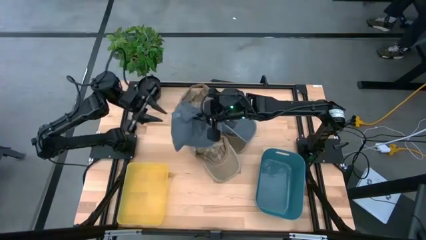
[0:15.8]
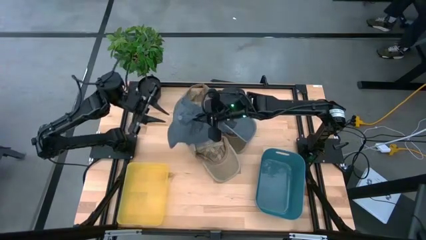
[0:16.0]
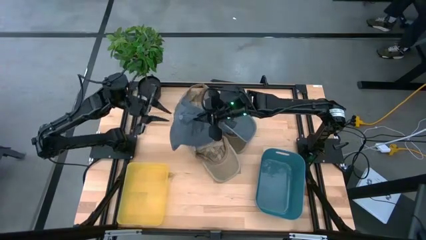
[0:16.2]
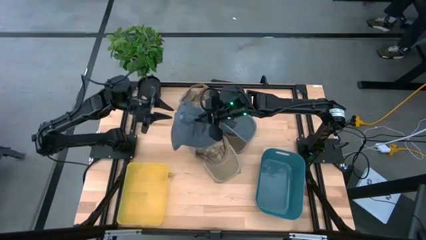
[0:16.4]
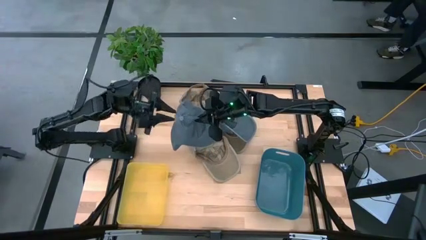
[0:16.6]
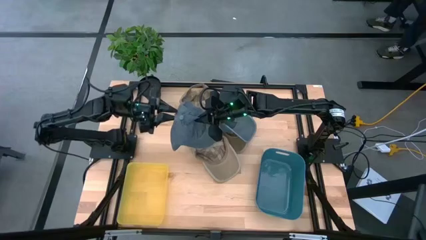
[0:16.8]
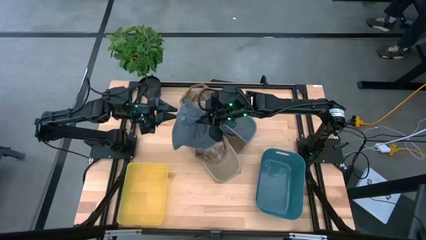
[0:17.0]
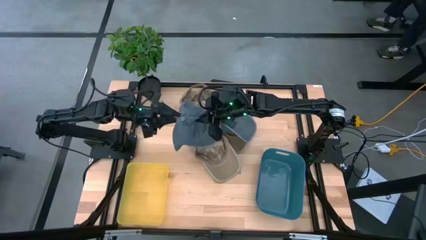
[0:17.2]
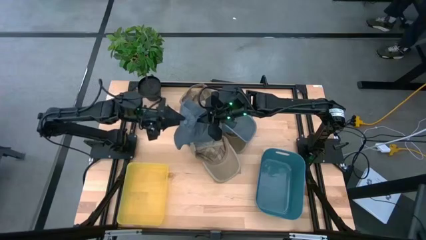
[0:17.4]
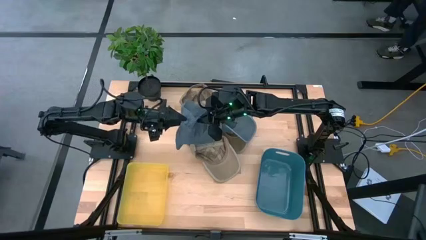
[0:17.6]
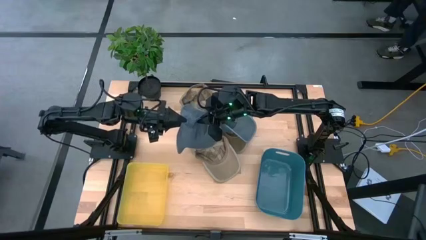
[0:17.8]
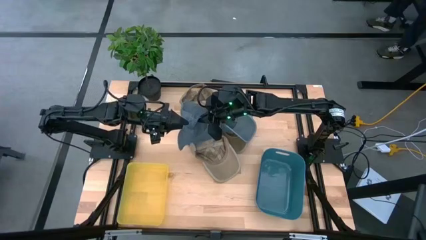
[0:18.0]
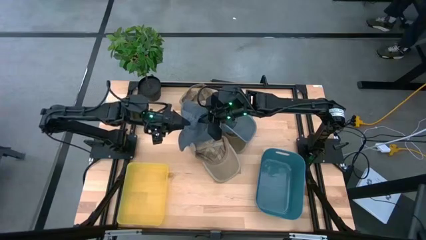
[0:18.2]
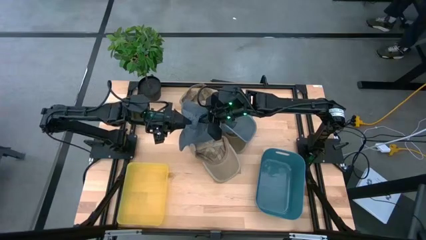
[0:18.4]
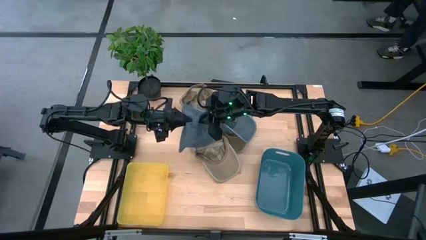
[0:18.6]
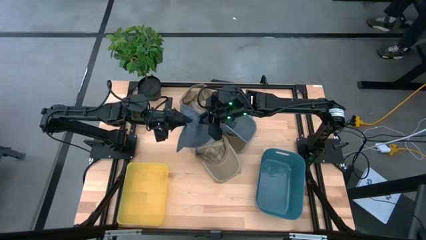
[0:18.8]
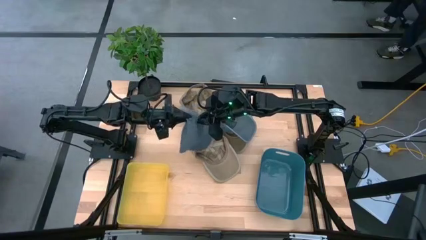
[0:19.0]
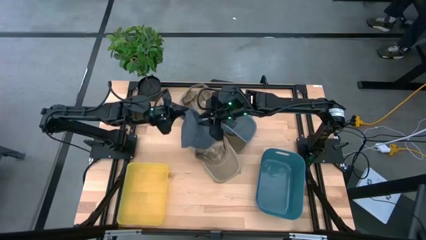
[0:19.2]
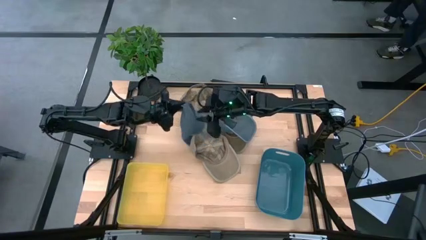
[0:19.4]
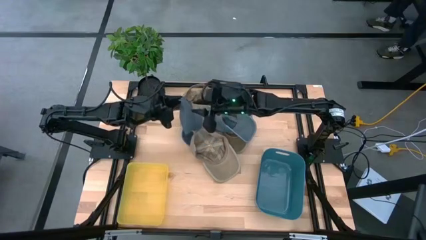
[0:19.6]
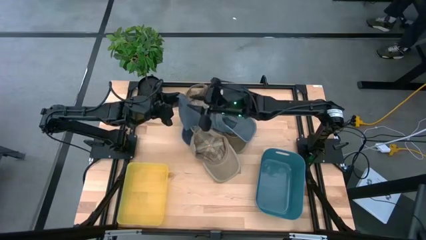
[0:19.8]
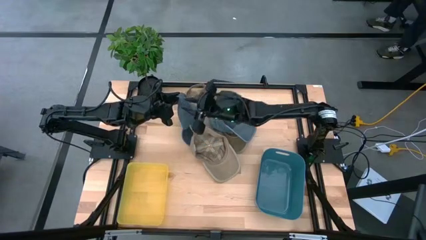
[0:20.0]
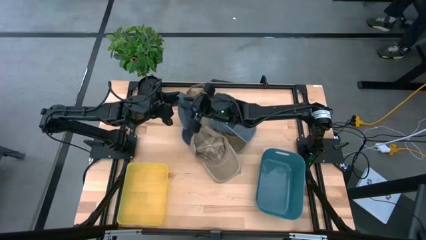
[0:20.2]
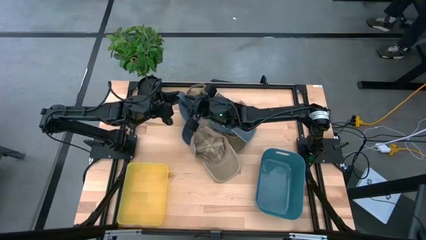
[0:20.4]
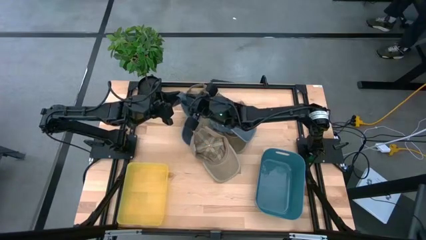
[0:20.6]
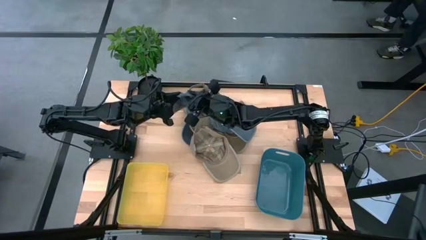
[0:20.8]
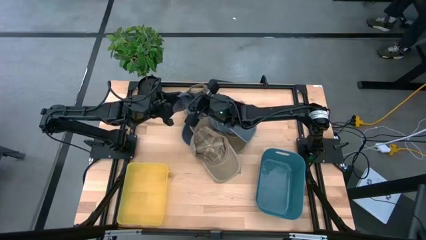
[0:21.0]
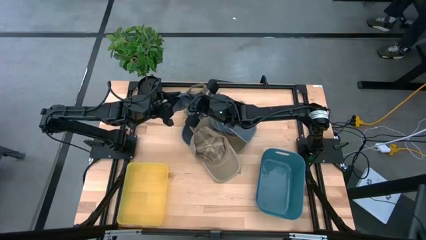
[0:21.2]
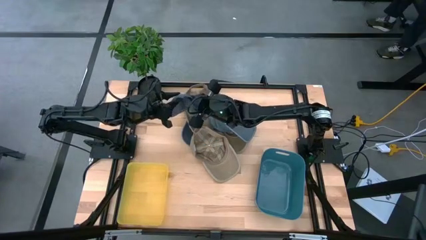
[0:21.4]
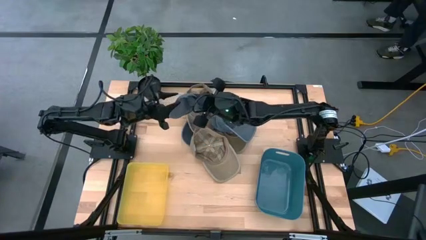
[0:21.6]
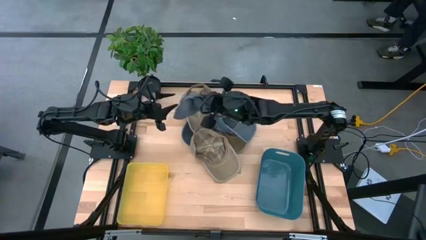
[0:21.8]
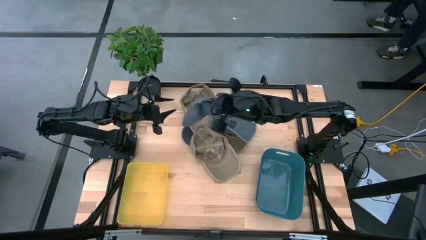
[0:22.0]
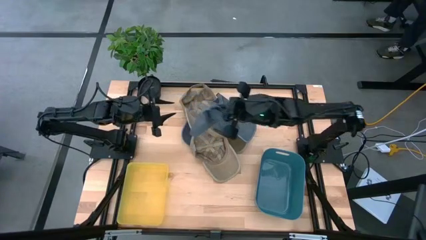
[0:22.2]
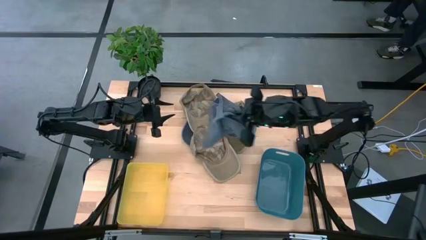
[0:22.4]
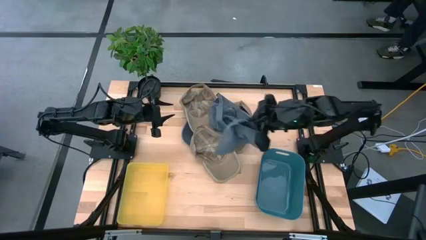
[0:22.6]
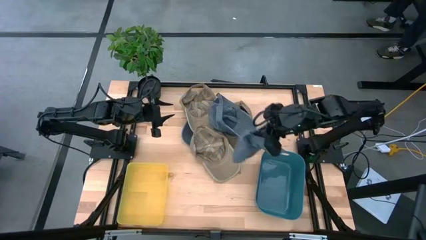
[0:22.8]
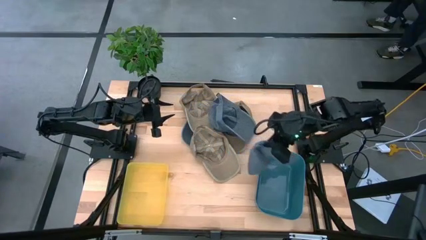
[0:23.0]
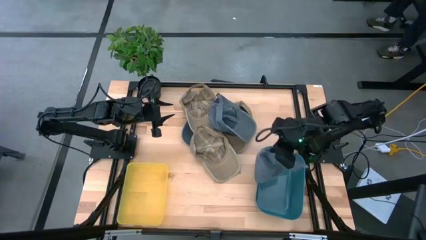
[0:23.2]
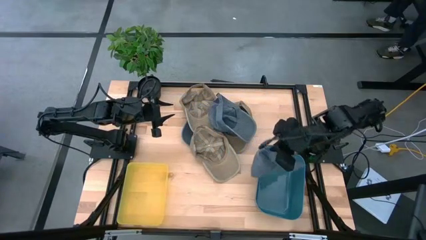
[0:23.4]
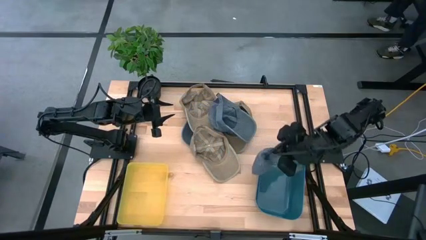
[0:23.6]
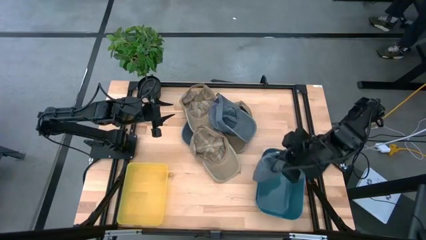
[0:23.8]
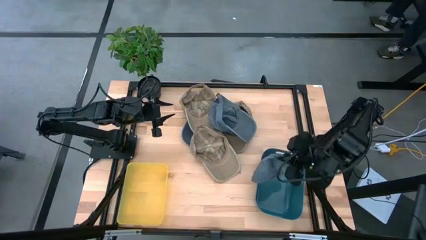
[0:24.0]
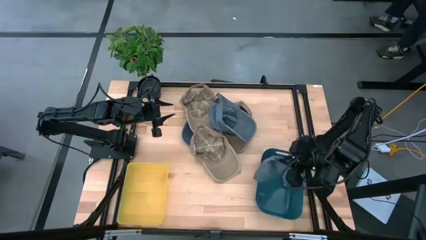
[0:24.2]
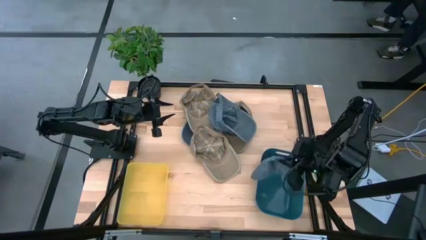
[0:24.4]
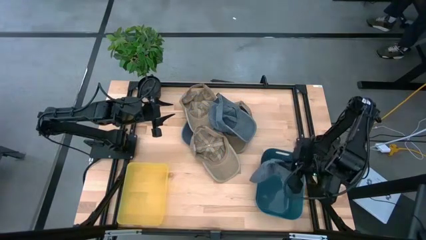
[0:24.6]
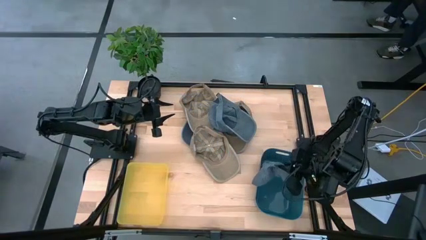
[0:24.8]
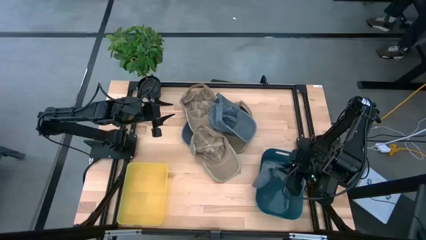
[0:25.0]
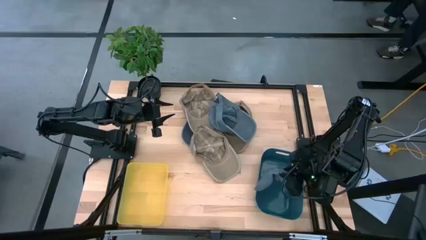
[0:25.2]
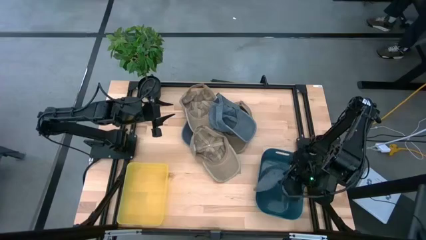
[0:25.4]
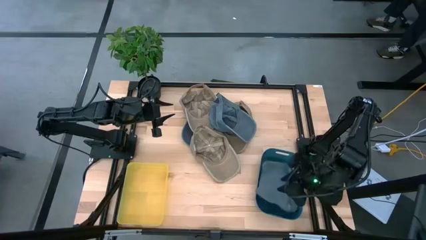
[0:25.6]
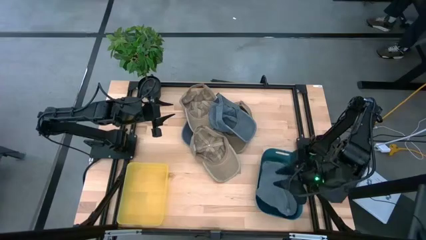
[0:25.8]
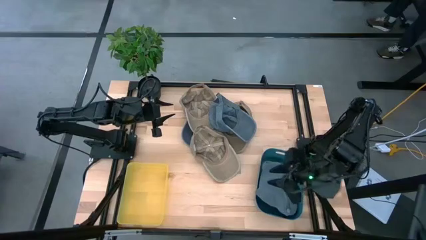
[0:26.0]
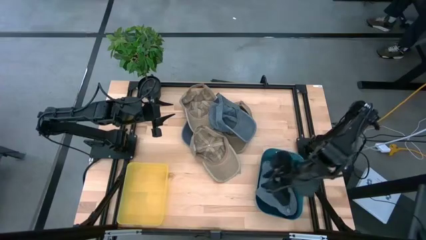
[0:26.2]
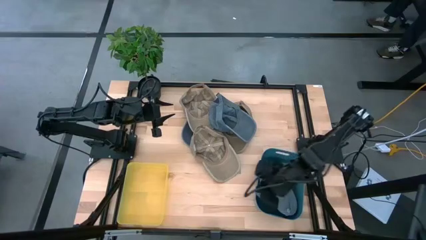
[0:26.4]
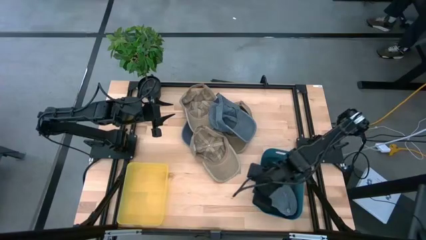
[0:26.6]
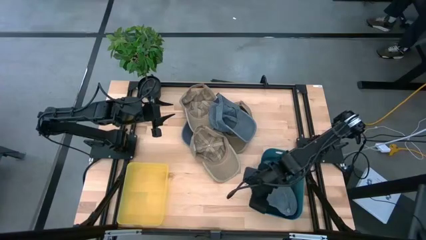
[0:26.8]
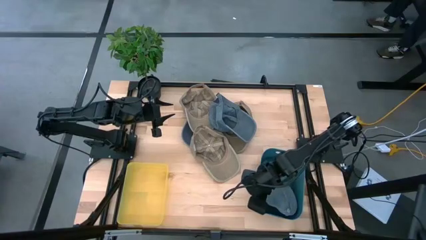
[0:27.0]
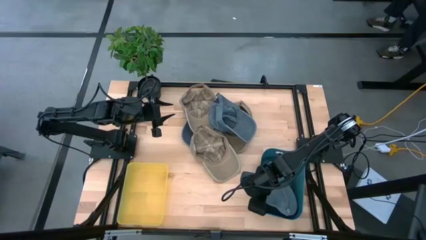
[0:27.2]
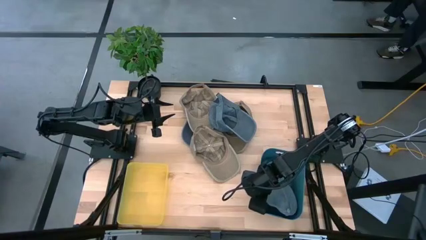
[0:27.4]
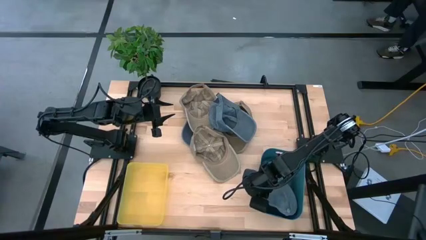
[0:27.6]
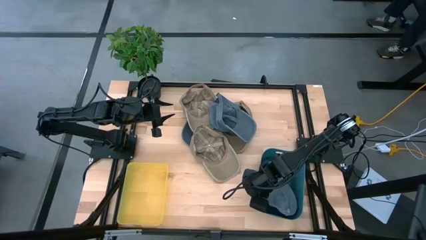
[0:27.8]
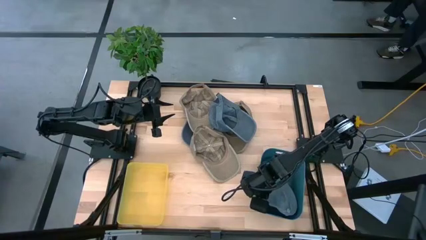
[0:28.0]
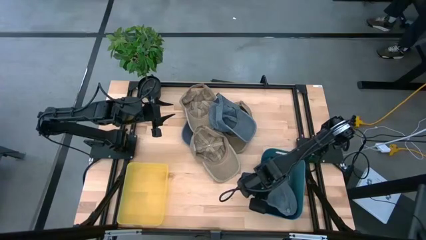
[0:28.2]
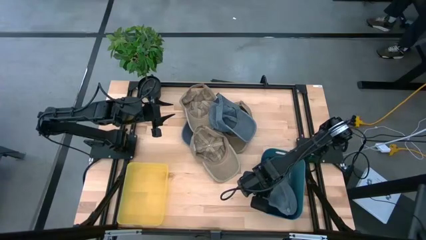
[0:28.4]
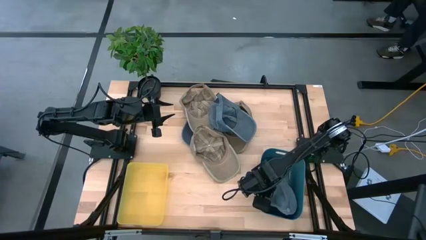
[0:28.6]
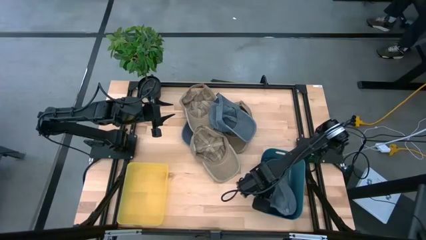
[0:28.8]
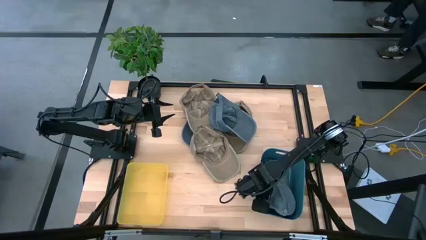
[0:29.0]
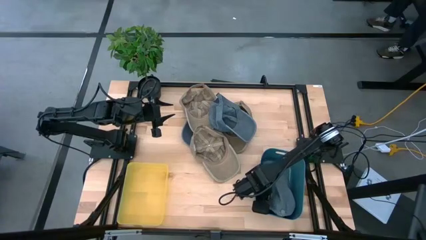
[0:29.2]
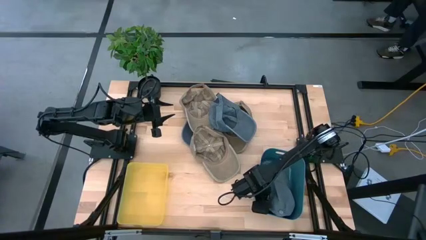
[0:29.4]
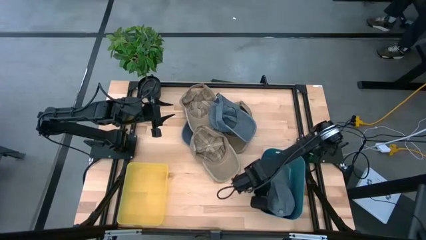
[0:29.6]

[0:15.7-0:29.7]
Task: Pick & Place hat
Put the bottom blue cap into the blue bin
